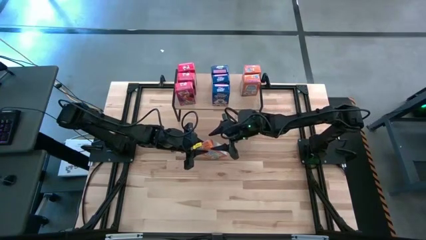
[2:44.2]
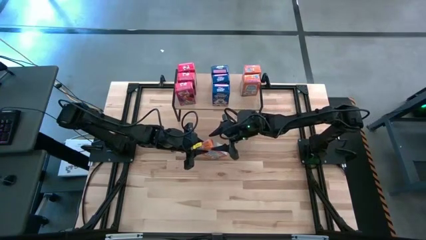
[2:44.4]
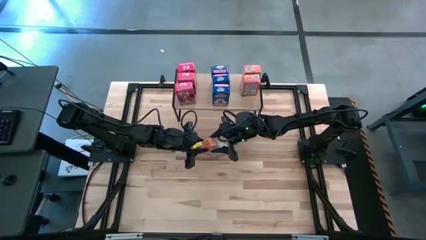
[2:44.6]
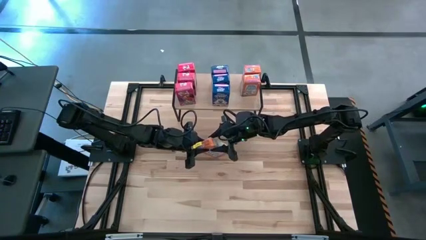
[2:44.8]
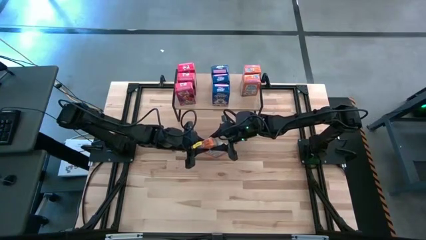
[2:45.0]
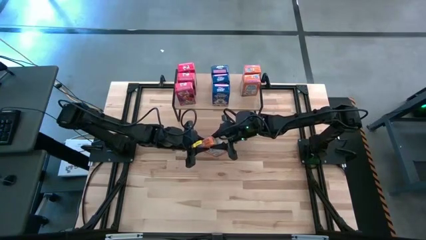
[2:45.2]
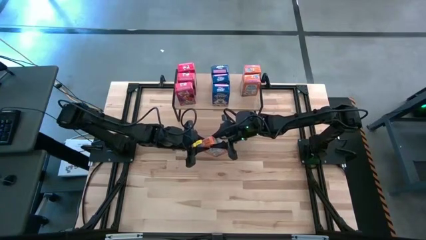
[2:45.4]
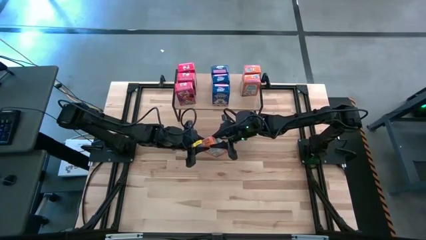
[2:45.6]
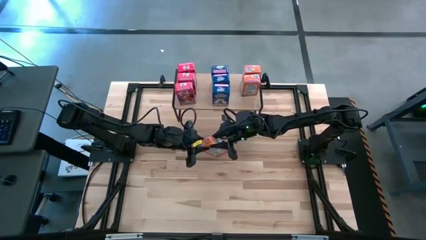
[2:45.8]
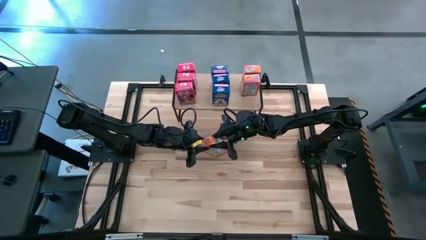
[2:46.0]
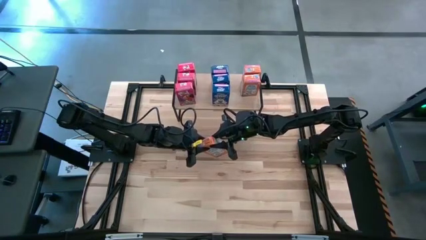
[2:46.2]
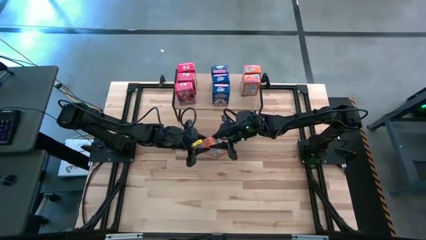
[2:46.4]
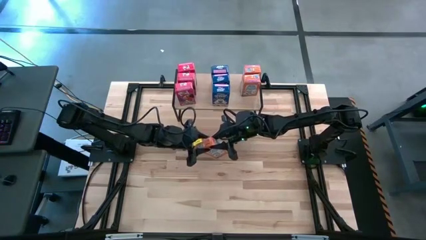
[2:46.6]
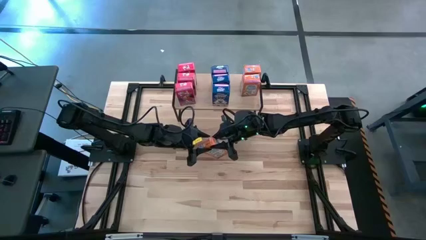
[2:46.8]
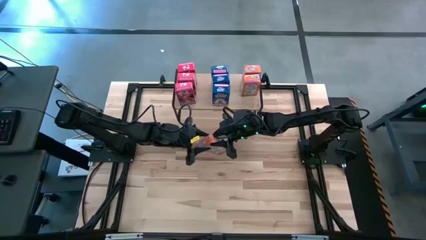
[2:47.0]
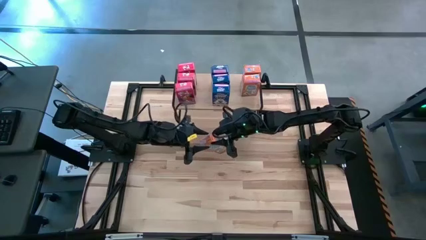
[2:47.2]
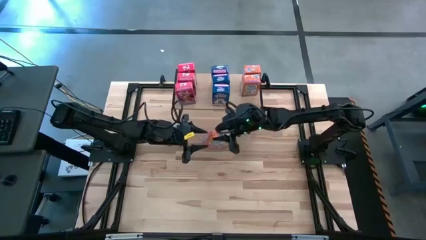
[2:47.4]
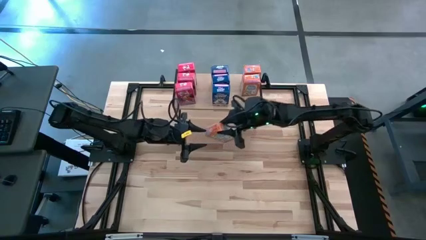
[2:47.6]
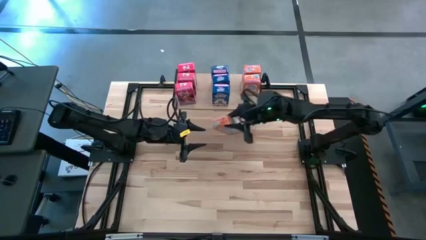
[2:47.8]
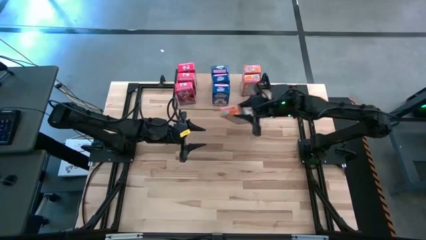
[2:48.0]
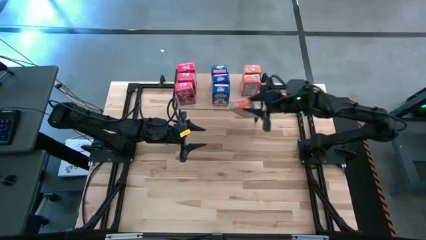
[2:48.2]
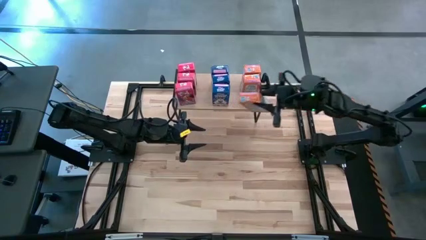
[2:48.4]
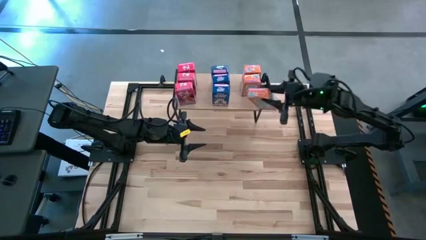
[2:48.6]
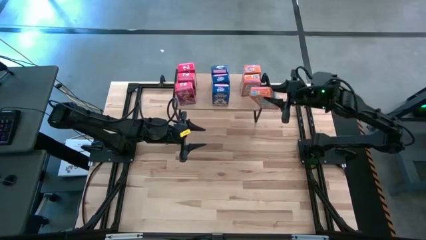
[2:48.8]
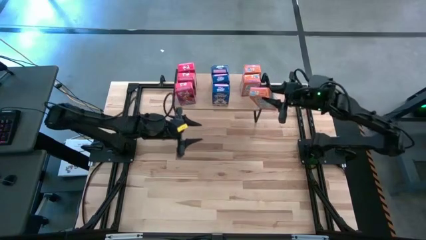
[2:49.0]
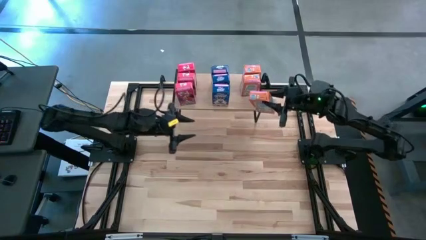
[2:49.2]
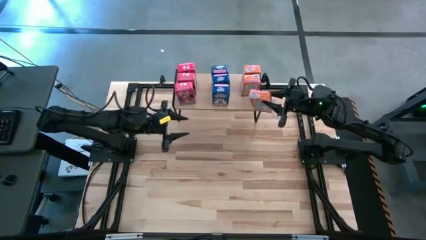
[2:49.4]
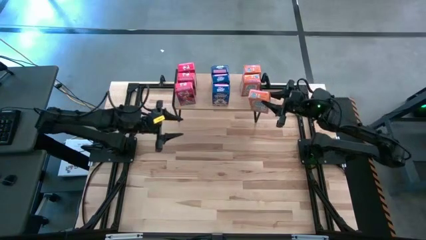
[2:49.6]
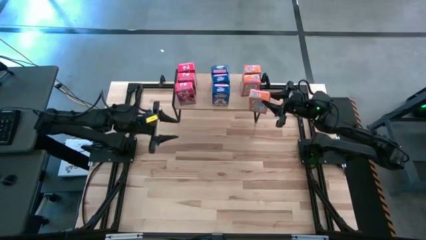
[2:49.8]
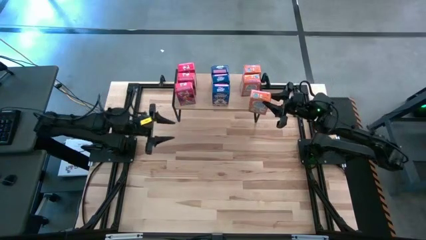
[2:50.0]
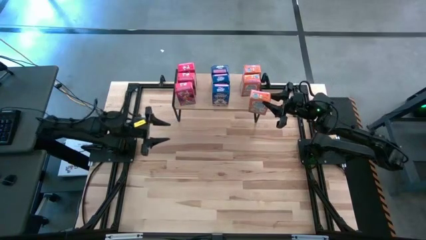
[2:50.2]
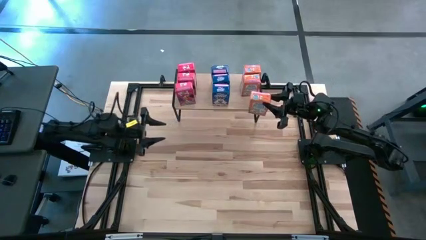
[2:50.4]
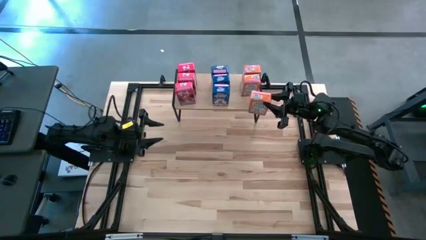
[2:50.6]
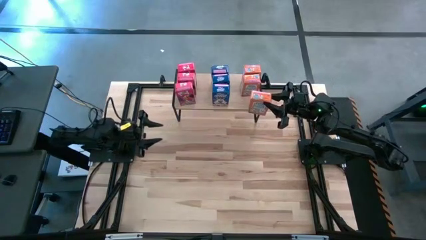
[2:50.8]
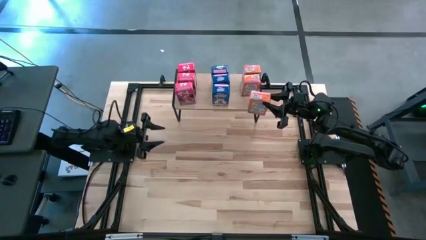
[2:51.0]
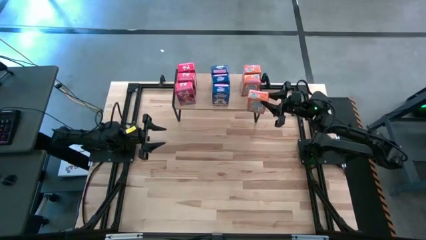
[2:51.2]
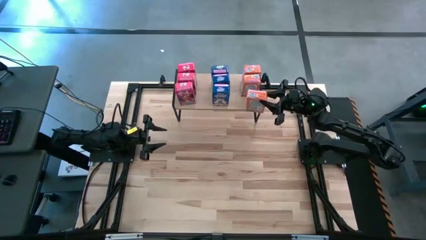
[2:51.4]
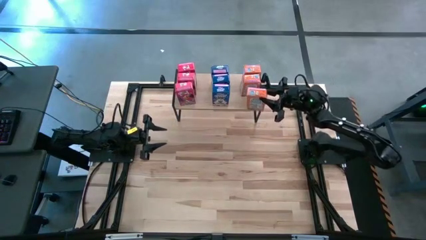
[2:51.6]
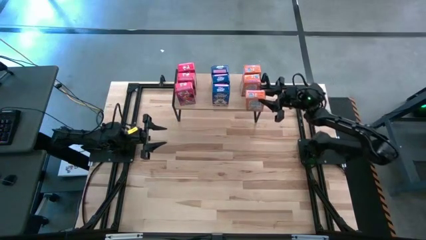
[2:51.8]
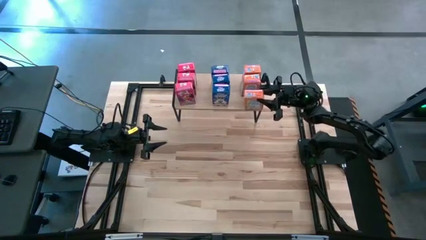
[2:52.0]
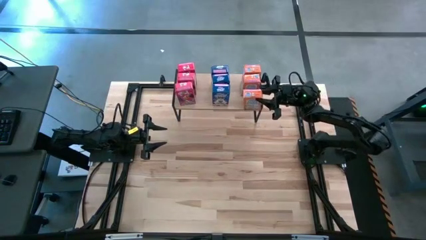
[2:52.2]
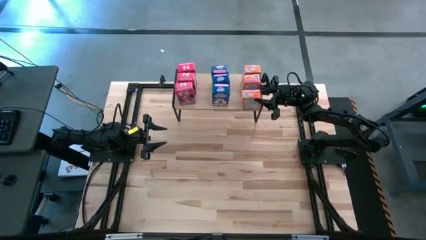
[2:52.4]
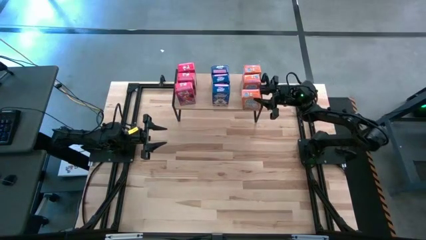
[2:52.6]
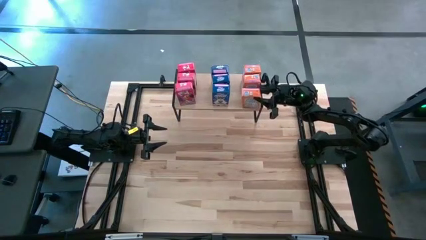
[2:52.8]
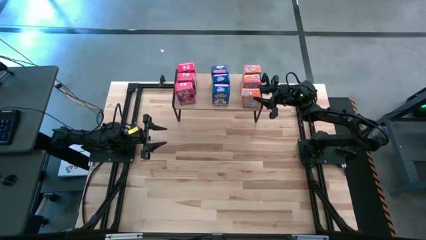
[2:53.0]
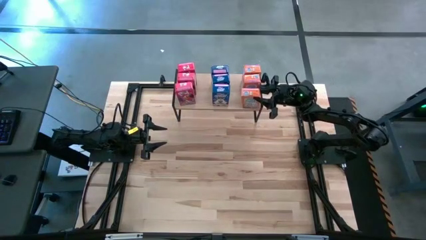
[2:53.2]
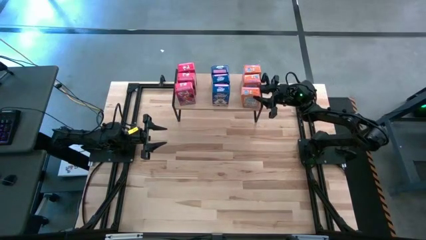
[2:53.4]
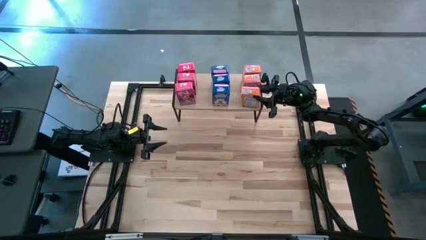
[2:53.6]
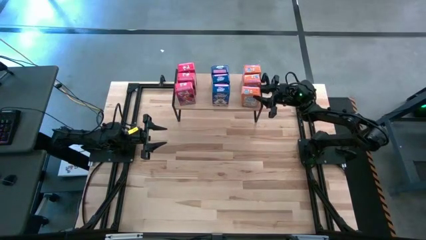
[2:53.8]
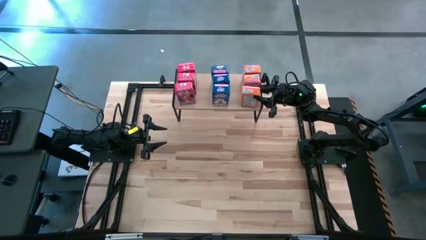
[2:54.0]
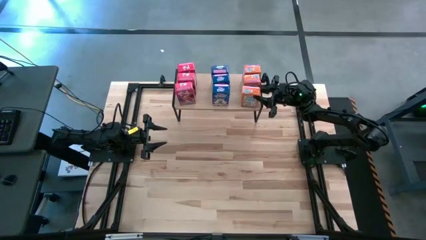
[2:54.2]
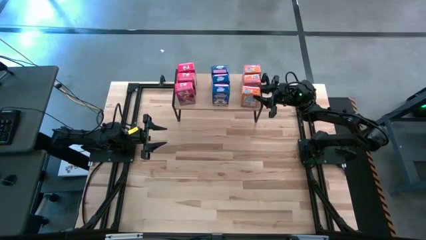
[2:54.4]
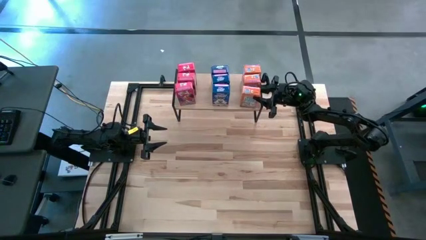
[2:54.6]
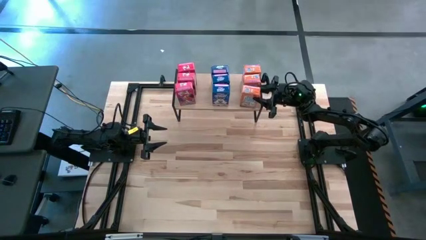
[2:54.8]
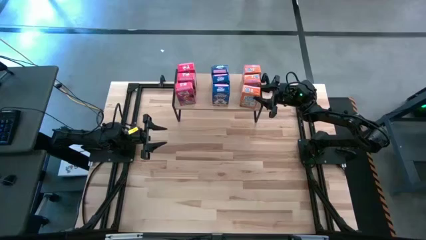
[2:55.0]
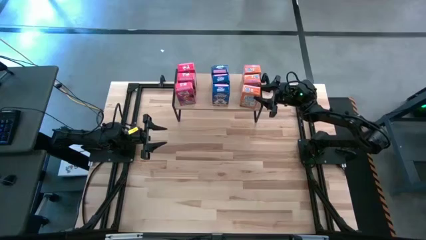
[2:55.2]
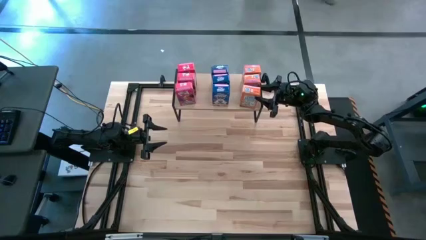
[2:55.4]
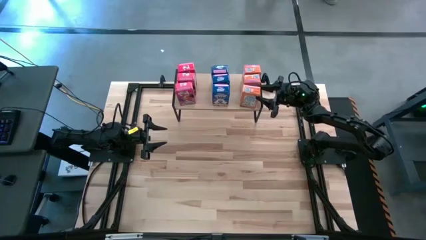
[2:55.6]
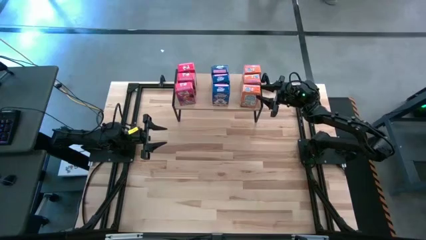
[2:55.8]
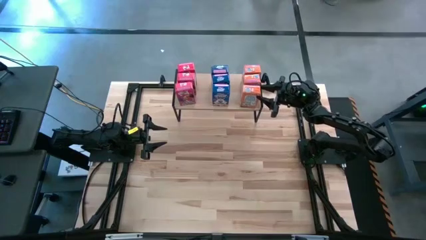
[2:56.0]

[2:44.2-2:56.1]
Task: Stack cereal on shelf
Put the orange cereal box on the shelf

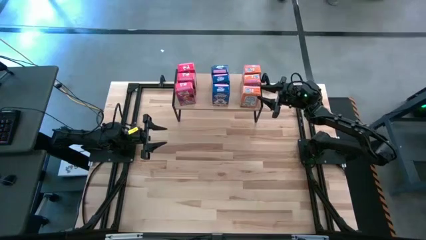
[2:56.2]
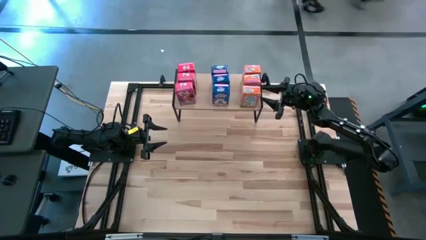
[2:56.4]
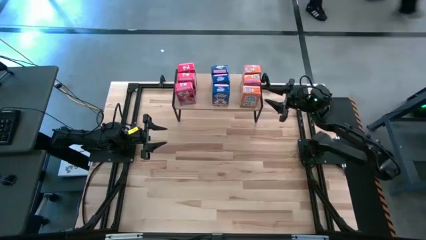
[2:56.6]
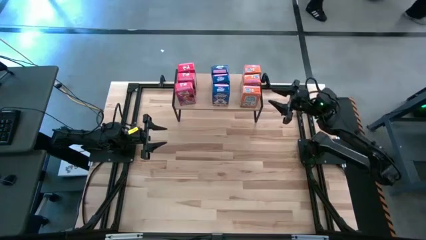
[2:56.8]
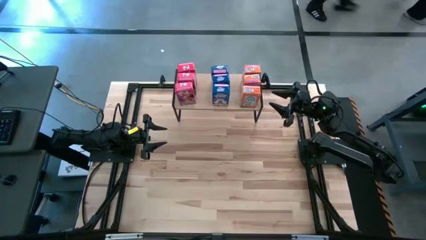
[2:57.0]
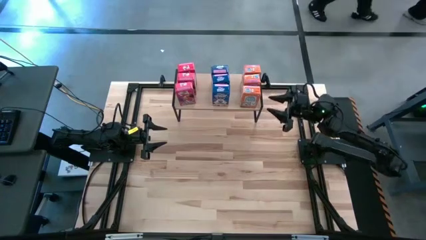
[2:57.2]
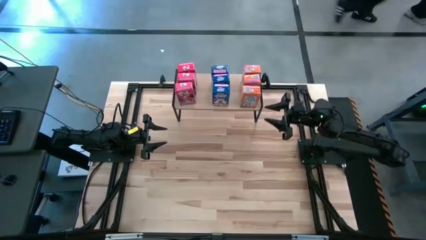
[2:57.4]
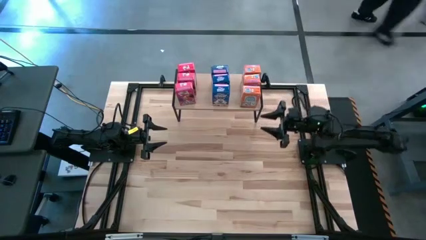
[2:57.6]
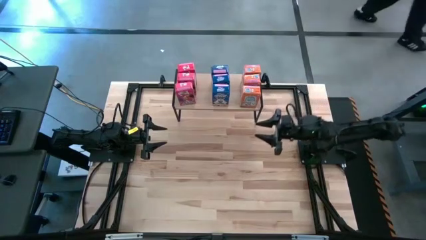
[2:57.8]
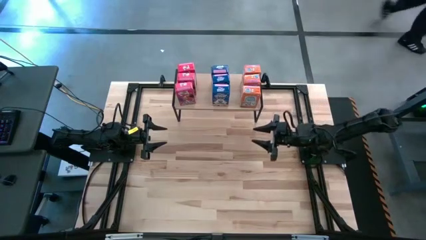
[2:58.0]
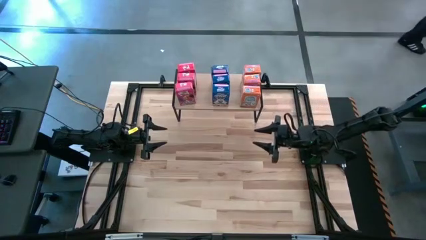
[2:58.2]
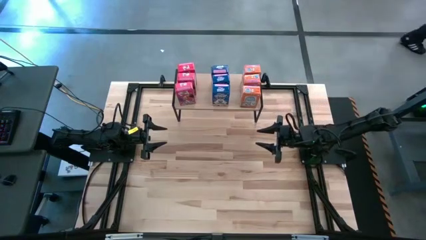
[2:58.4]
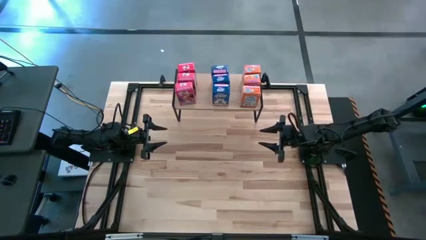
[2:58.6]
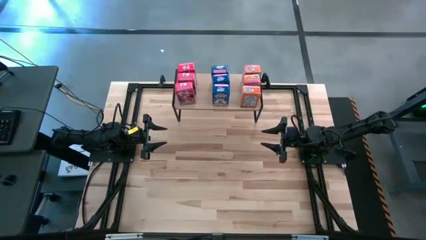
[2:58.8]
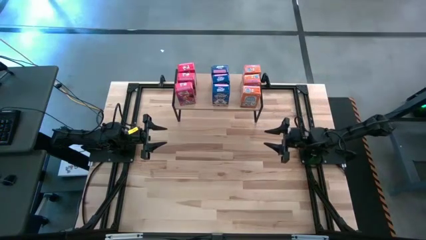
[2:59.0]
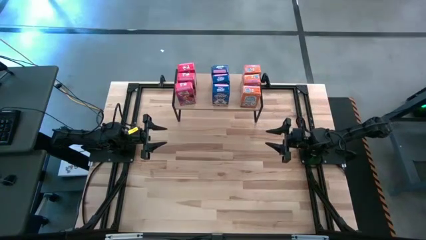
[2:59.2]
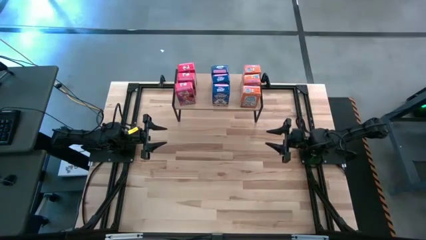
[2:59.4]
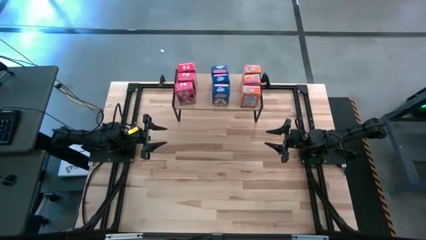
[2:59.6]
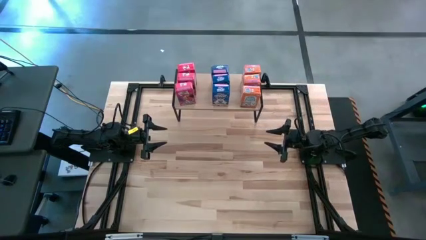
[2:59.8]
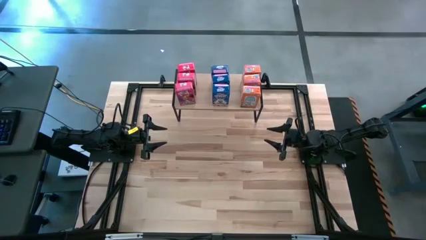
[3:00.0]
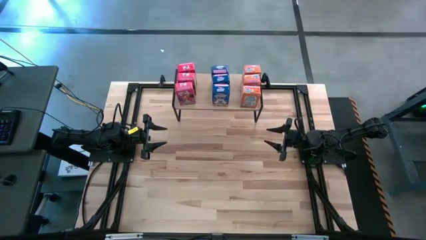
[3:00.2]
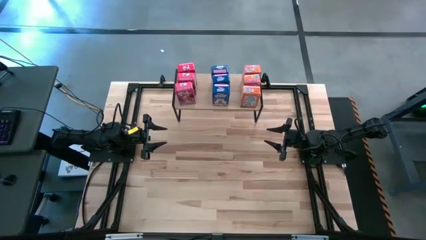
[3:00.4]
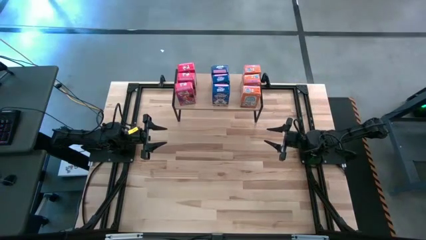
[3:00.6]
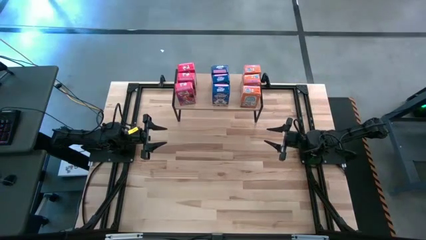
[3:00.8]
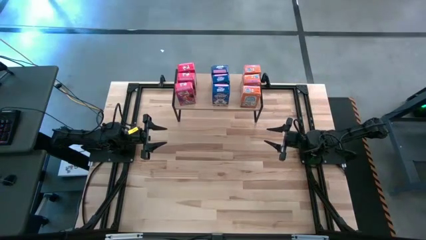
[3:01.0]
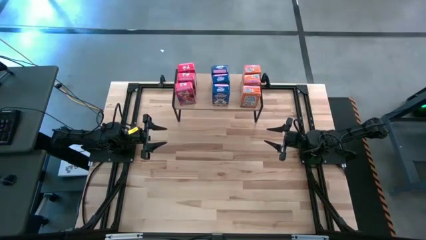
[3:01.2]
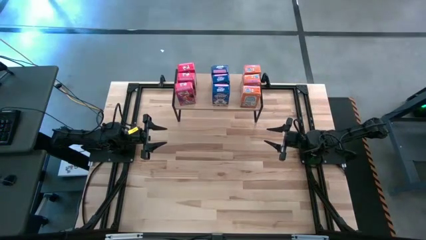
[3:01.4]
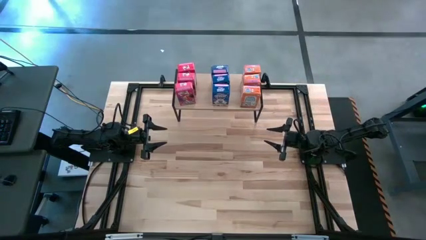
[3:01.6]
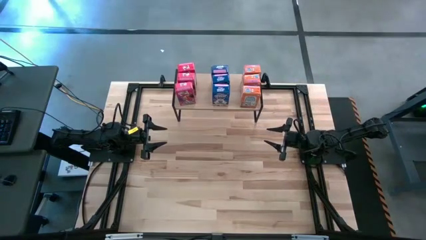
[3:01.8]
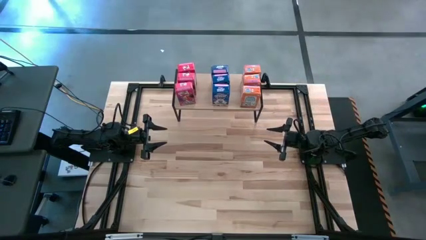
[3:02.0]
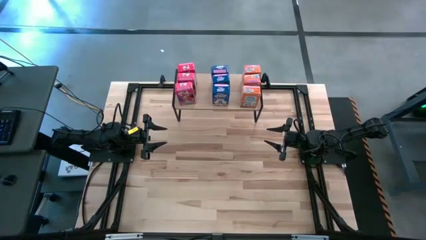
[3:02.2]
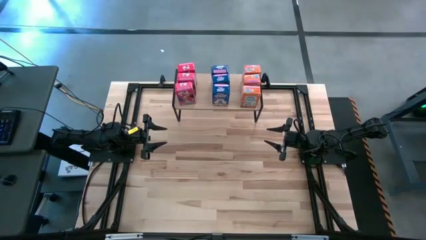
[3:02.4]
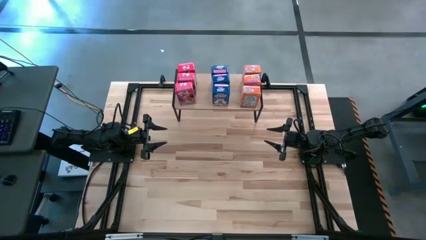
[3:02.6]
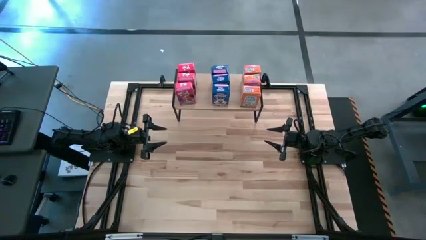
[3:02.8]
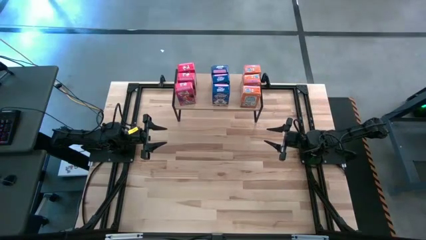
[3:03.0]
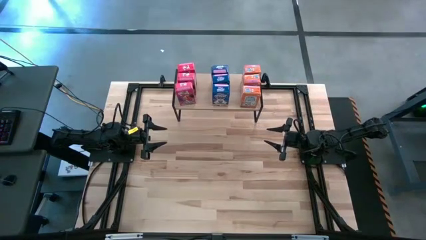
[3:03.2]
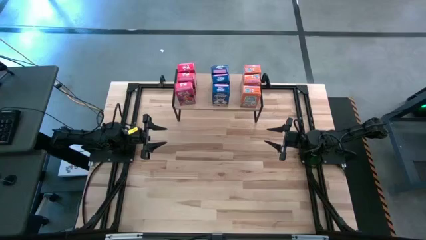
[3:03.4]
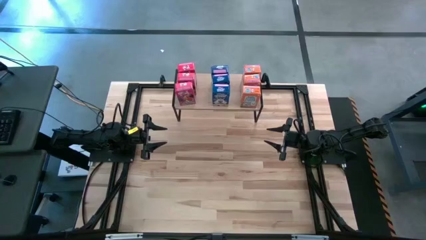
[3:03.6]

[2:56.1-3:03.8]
Return to Home Position
